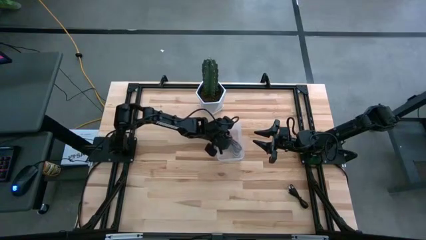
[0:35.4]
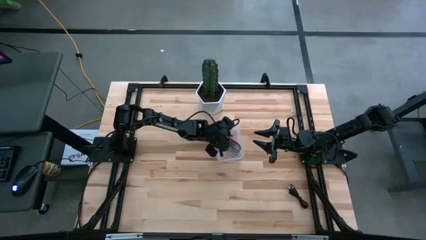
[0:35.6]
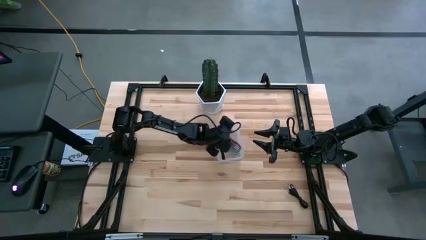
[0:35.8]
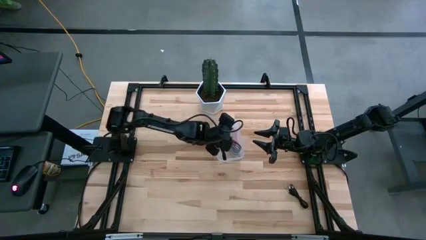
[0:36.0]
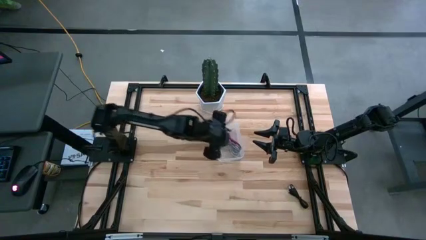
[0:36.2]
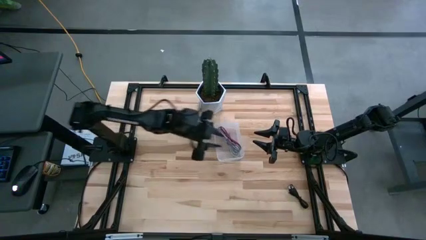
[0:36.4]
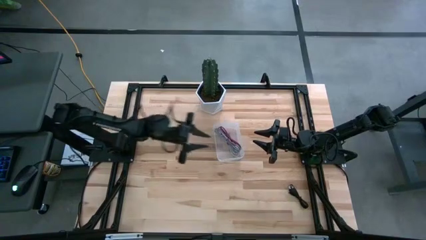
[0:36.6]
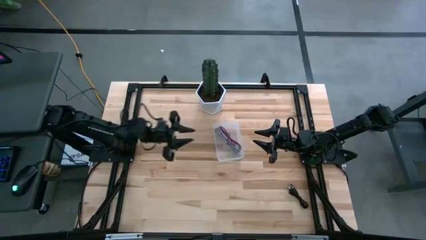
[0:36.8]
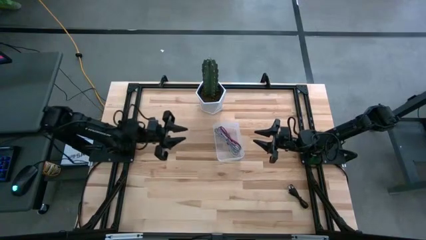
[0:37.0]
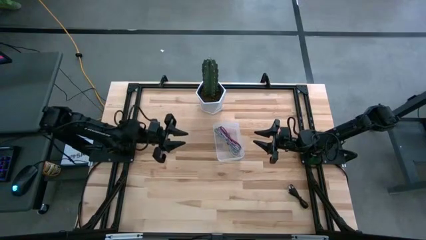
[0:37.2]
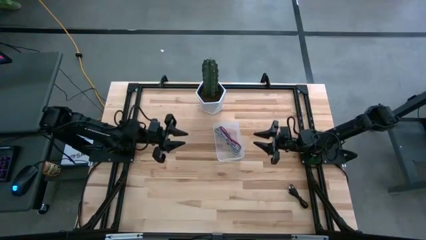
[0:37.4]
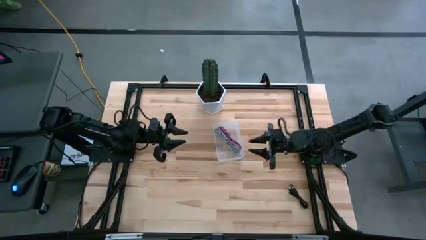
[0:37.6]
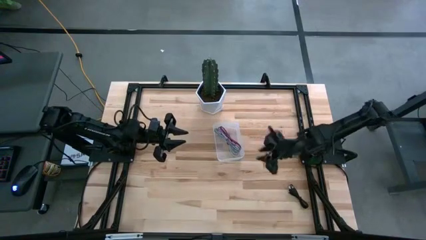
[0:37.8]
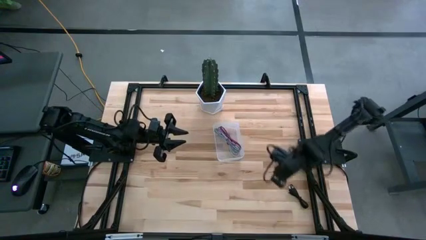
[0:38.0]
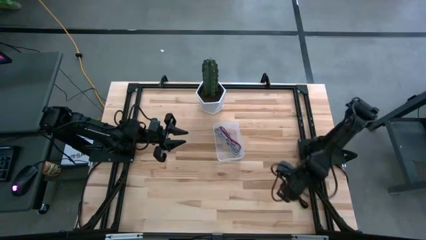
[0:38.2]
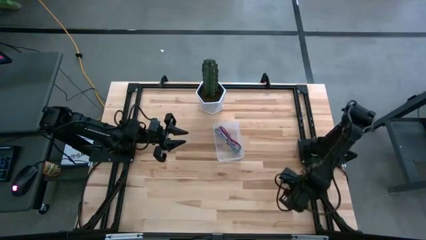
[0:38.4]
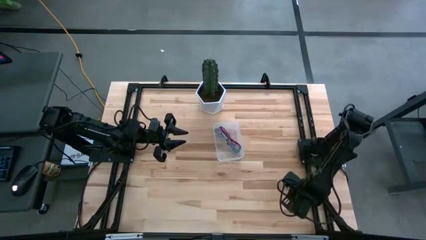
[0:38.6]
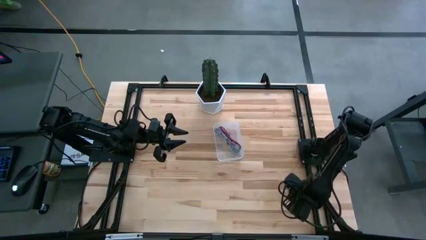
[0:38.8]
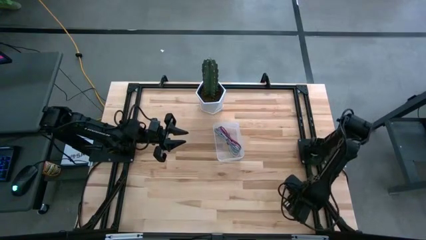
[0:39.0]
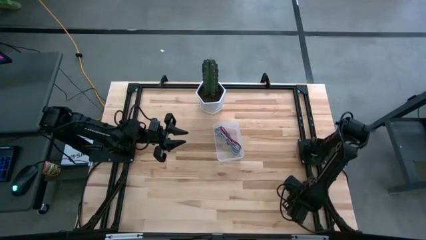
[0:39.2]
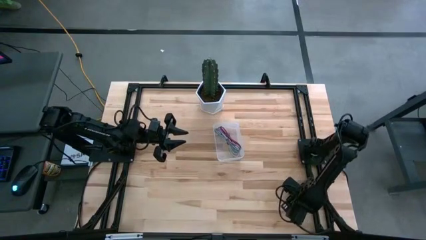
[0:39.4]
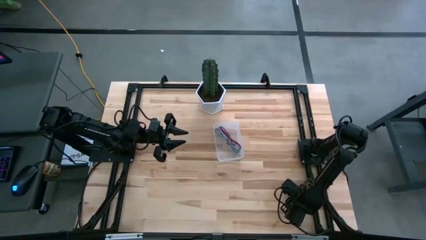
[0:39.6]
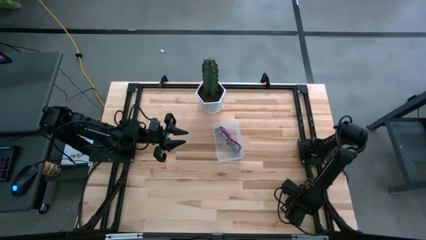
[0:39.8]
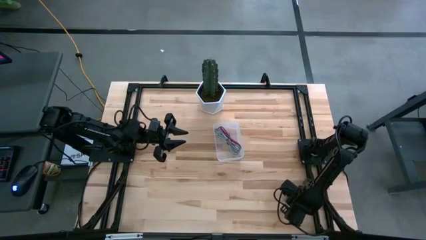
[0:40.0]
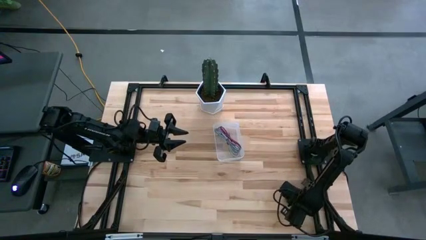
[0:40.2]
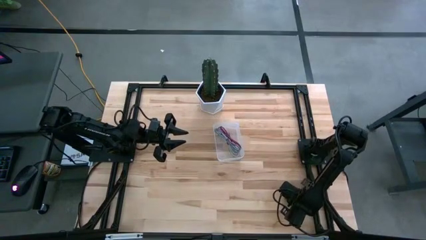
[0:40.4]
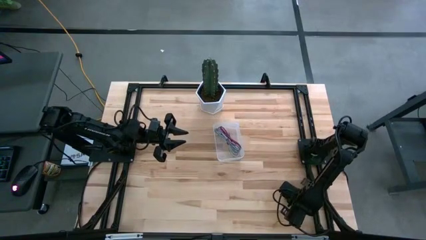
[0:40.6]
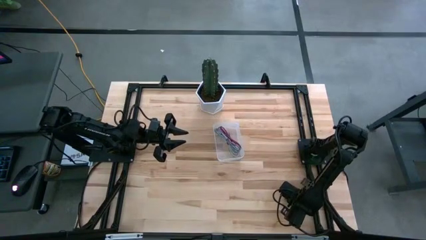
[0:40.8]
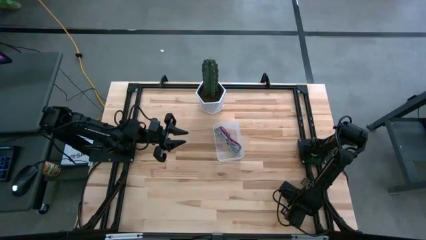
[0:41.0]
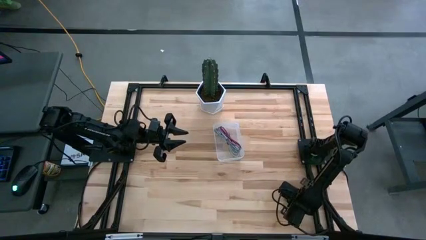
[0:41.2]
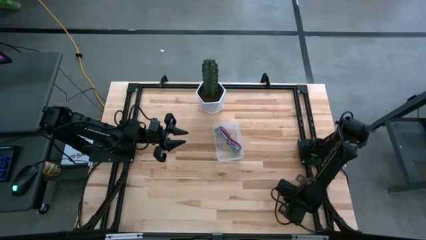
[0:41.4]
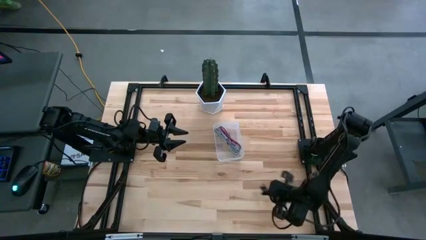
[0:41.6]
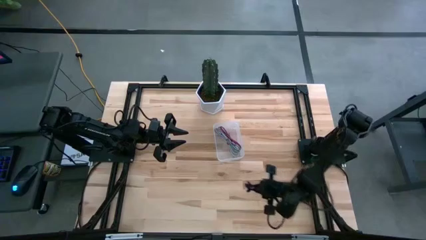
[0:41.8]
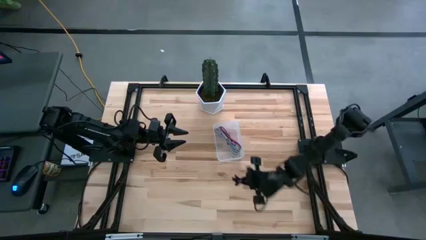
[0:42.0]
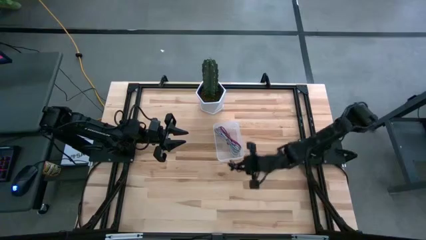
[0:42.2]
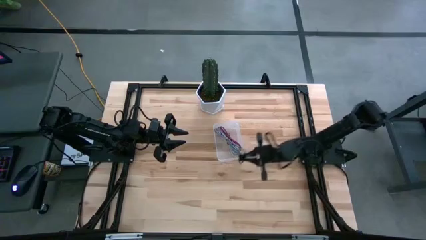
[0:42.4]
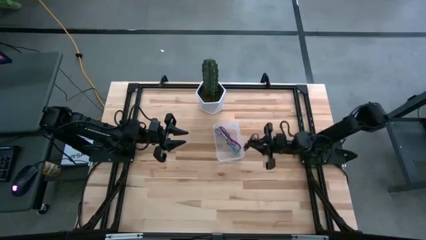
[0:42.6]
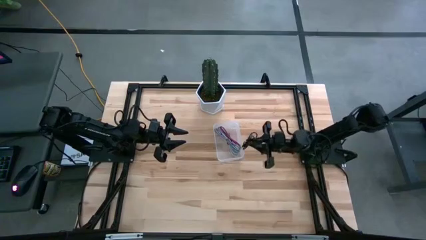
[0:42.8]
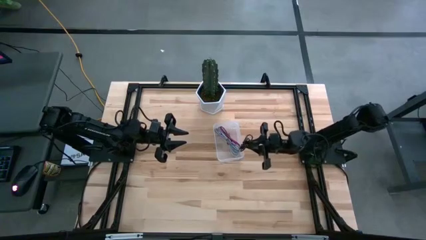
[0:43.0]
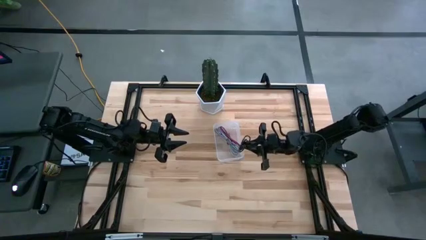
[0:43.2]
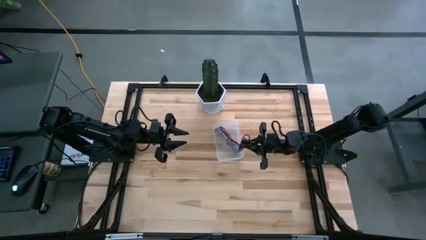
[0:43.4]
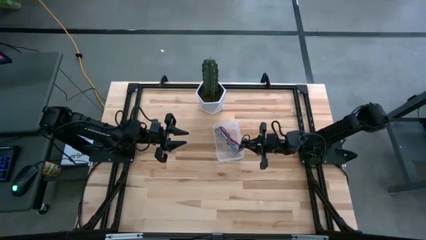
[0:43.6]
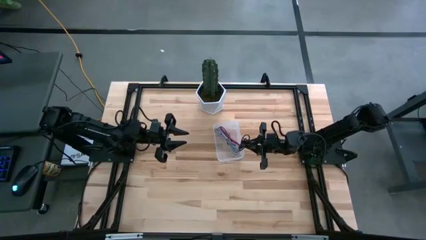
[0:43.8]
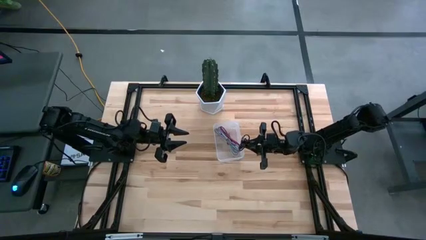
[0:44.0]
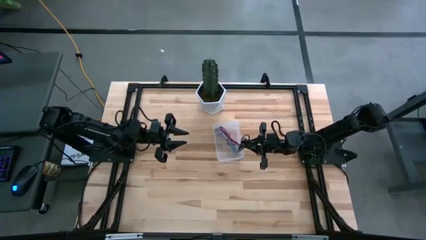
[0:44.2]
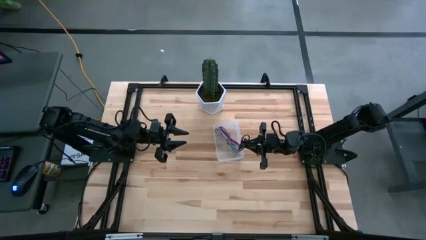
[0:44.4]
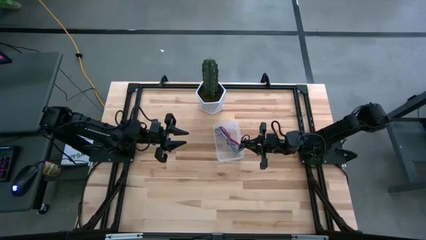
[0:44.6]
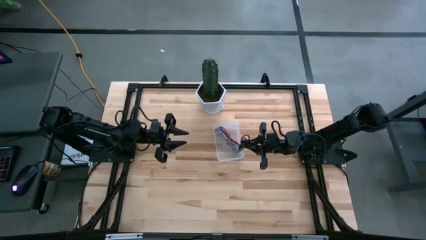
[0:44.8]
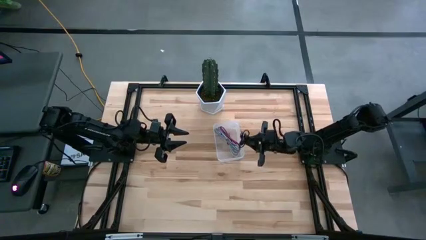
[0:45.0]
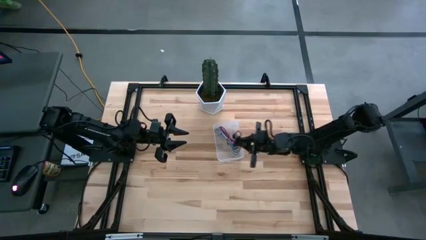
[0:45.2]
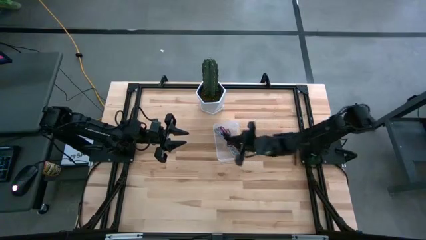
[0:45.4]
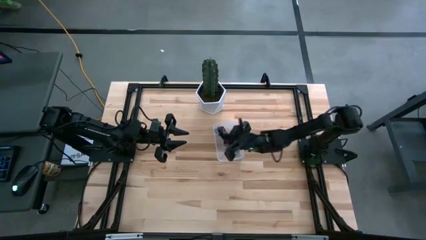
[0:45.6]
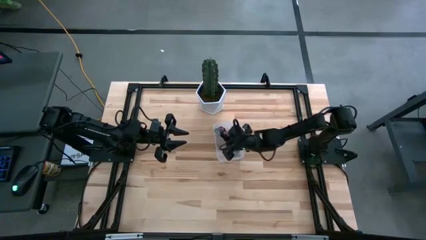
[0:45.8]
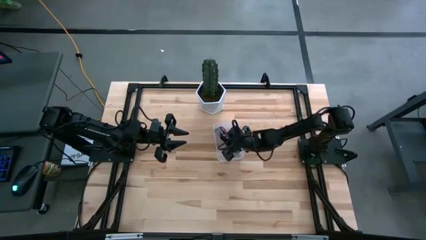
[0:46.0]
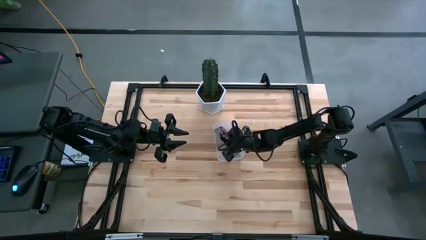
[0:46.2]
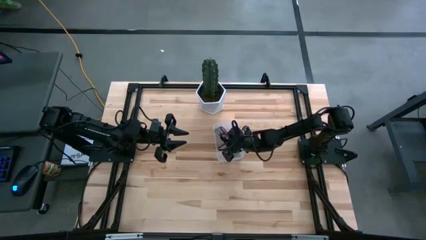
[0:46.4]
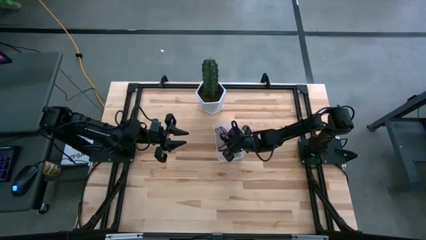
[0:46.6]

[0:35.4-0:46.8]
Task: Pick and place USB-C Cables
Put the black white charger cable into the transparent bin
